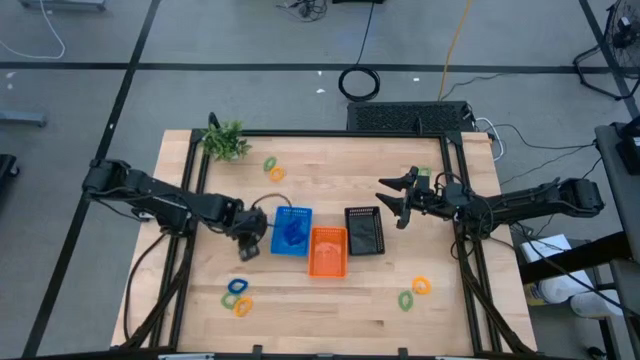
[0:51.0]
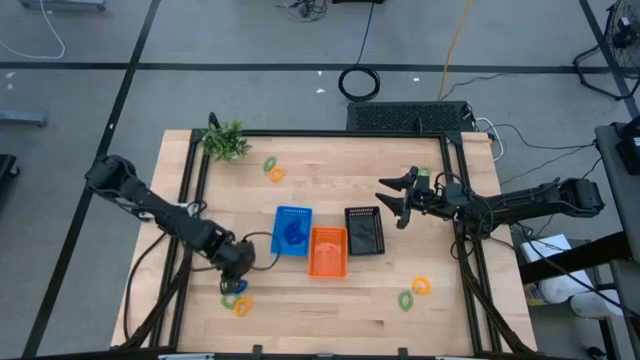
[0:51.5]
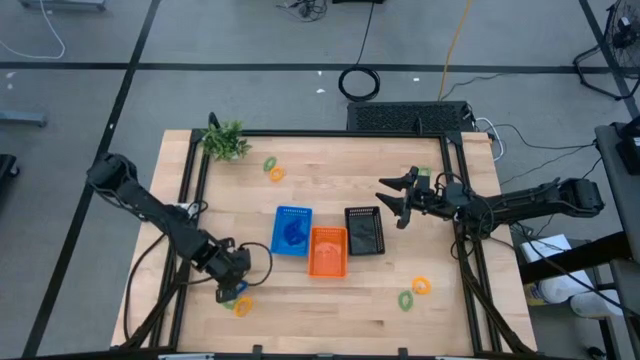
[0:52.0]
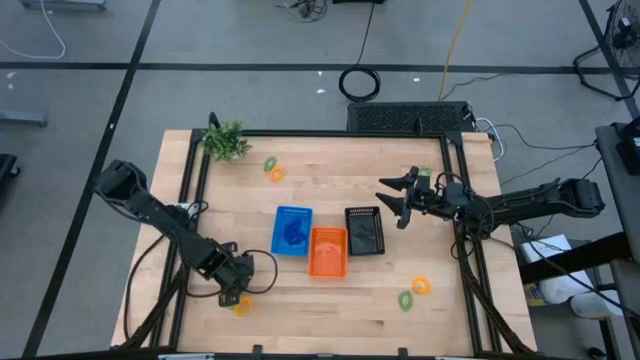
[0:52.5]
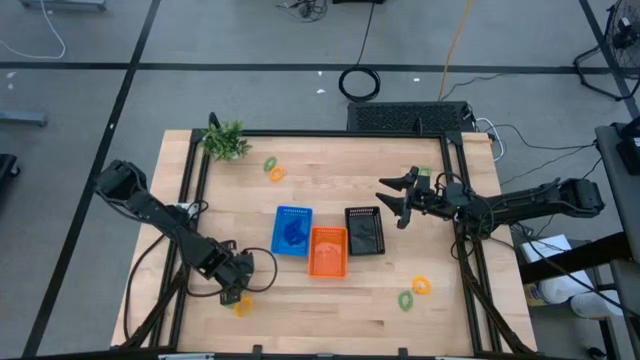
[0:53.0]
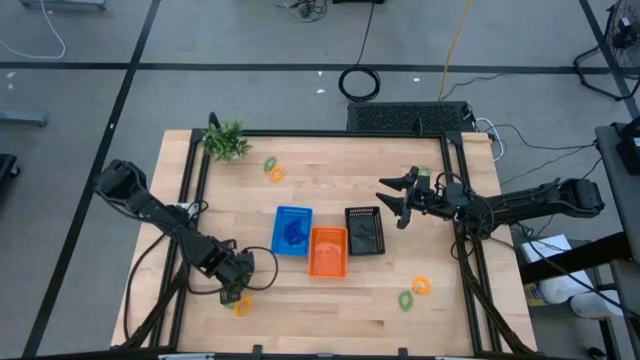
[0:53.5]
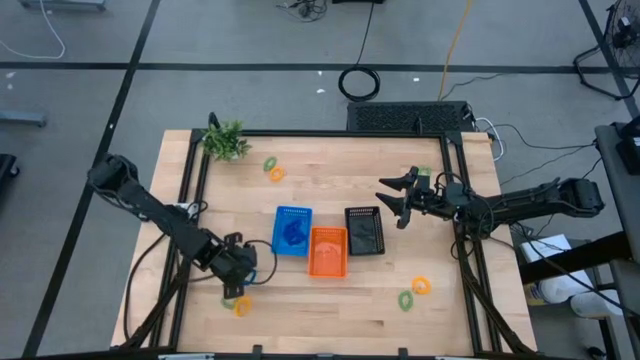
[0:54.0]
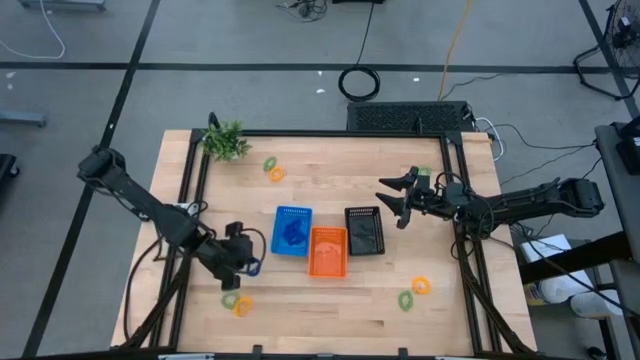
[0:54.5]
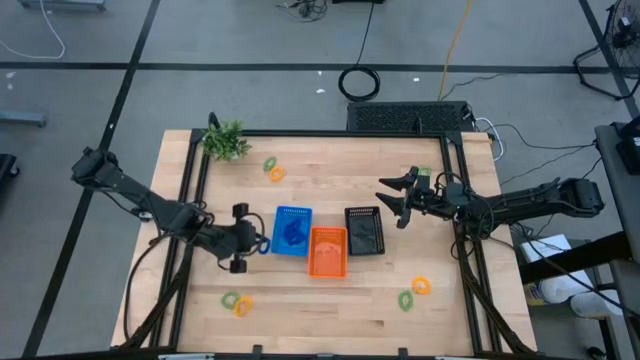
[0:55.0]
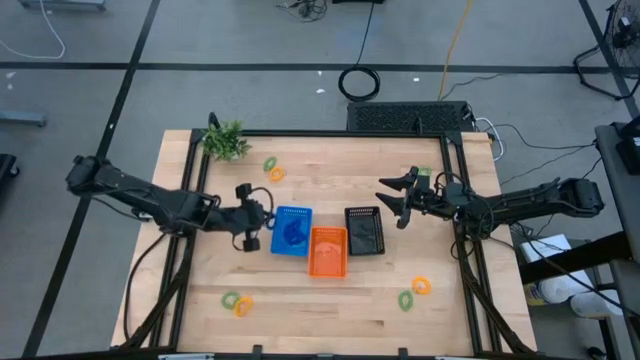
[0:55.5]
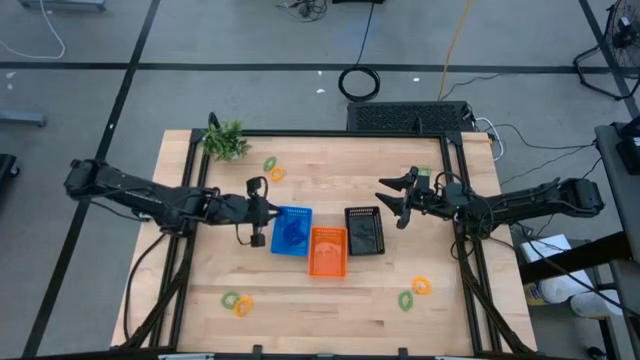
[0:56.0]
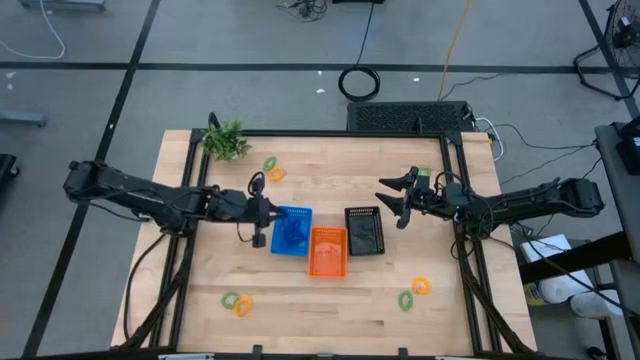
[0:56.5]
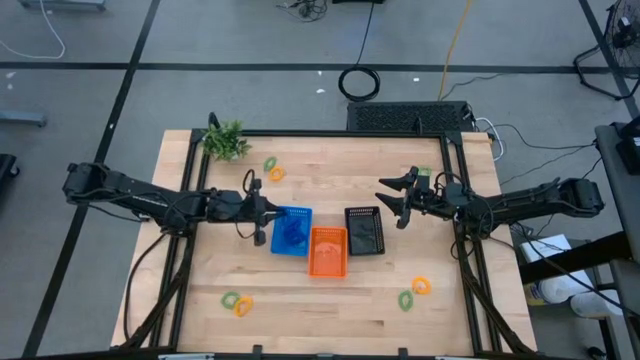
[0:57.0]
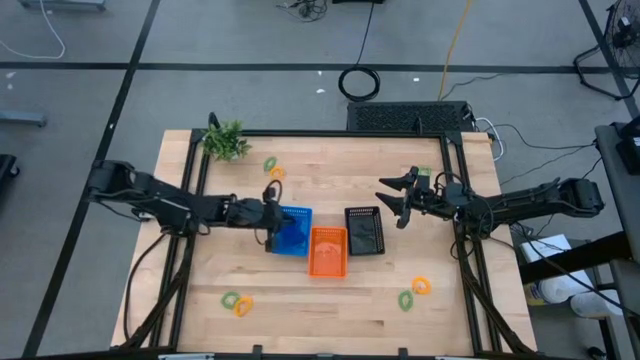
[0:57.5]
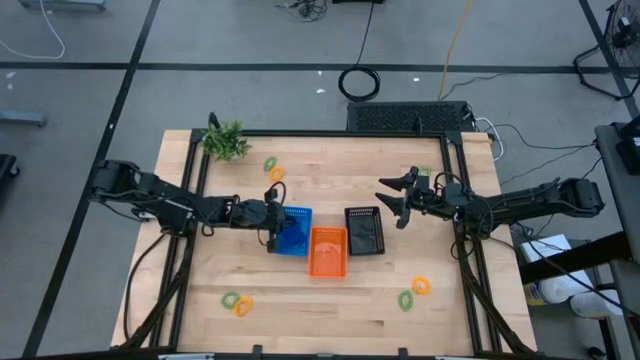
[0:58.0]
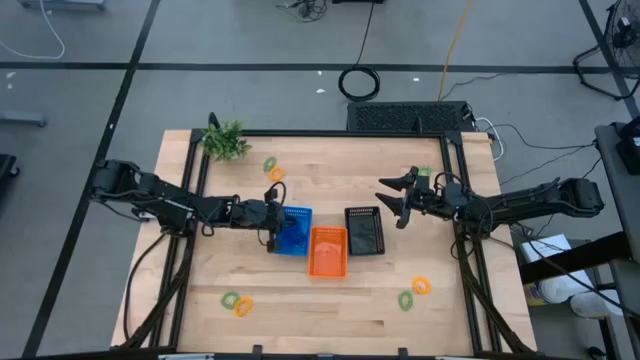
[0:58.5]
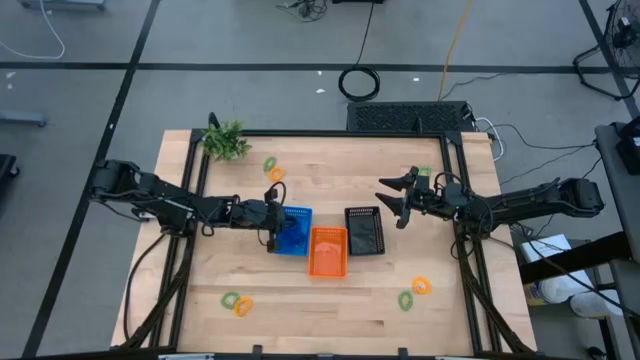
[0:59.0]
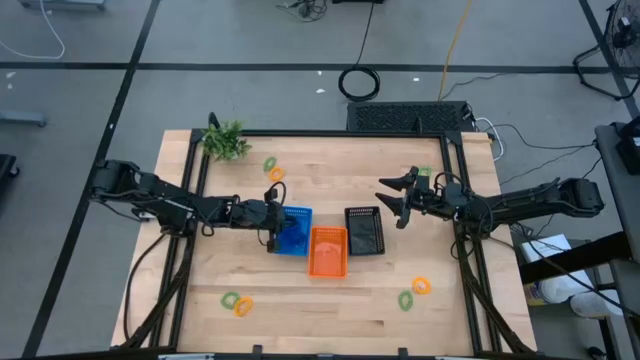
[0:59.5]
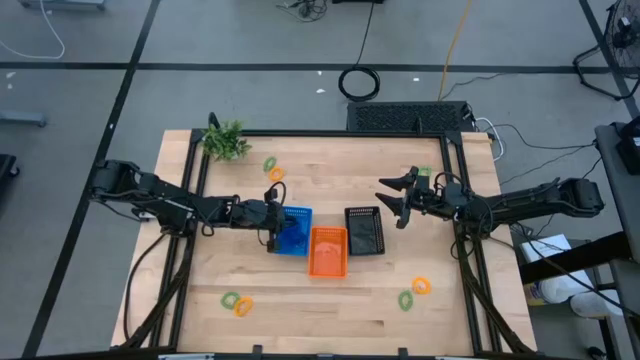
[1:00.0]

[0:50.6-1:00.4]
Task: Sort spring keychains
Put the blue spring keychain into the blue bin

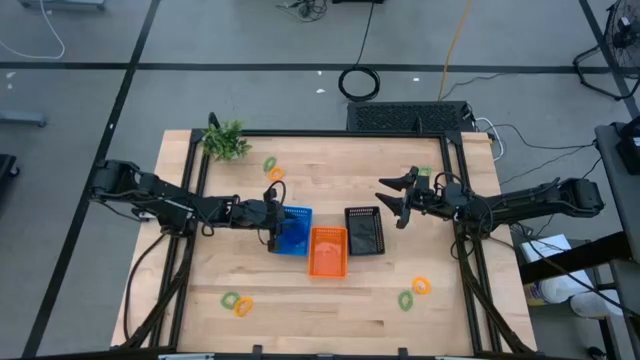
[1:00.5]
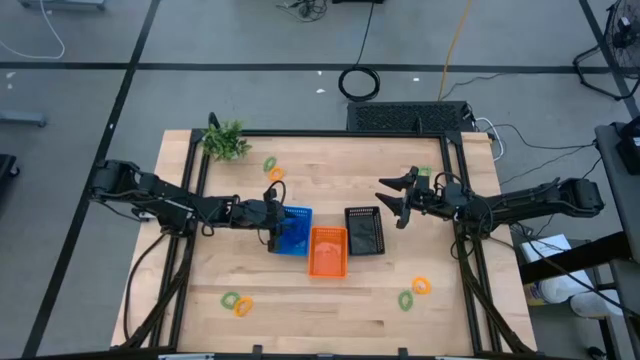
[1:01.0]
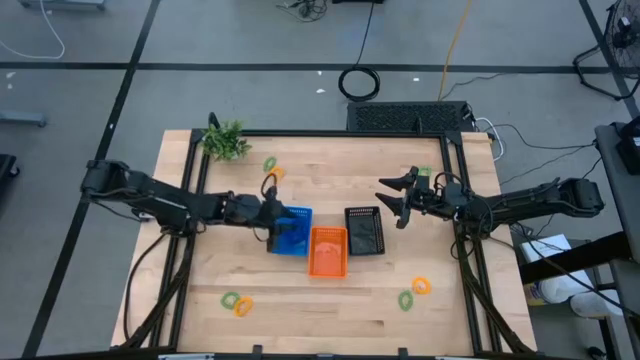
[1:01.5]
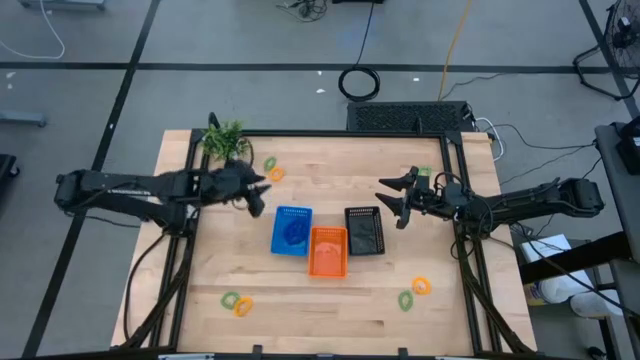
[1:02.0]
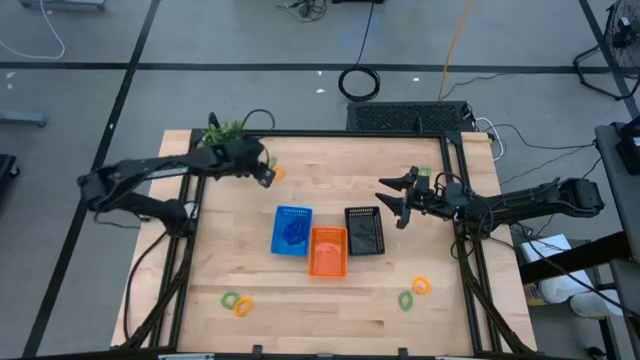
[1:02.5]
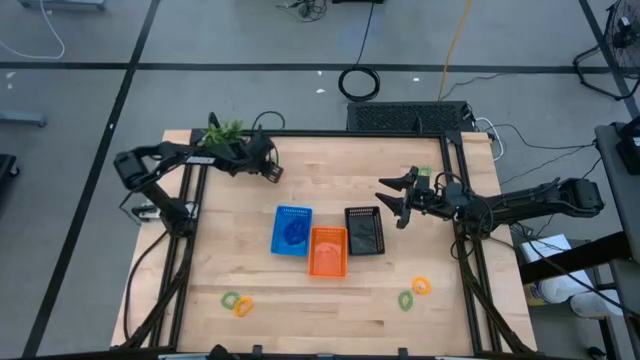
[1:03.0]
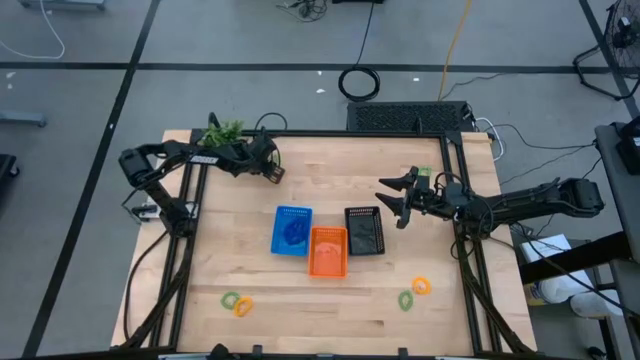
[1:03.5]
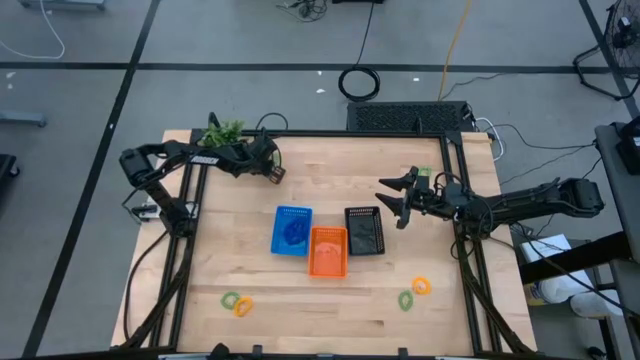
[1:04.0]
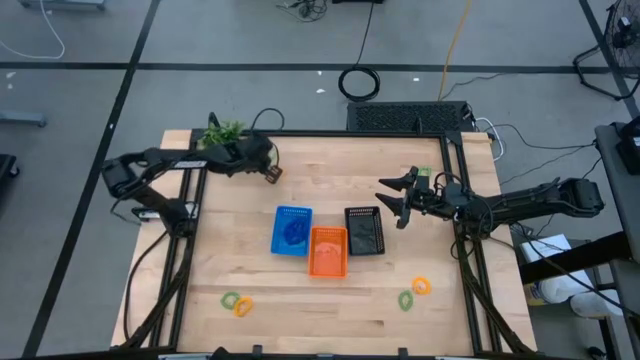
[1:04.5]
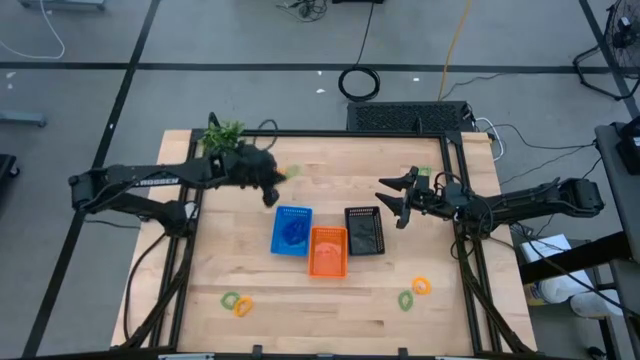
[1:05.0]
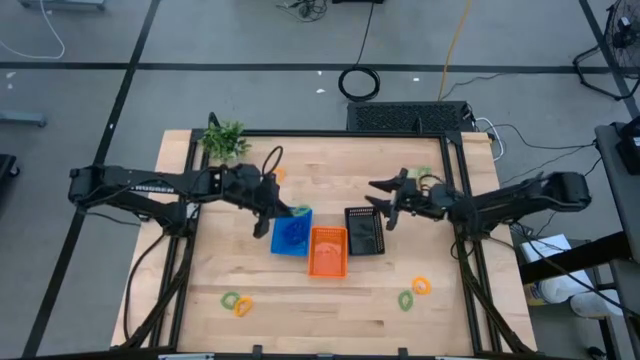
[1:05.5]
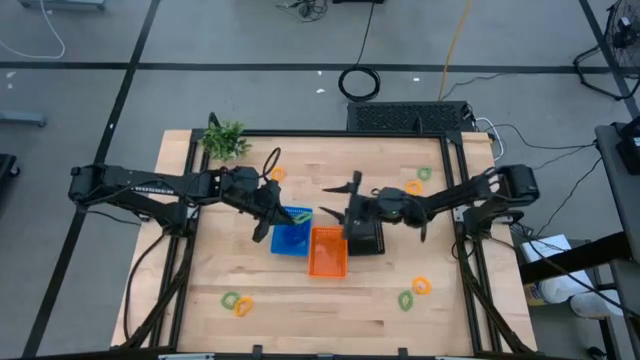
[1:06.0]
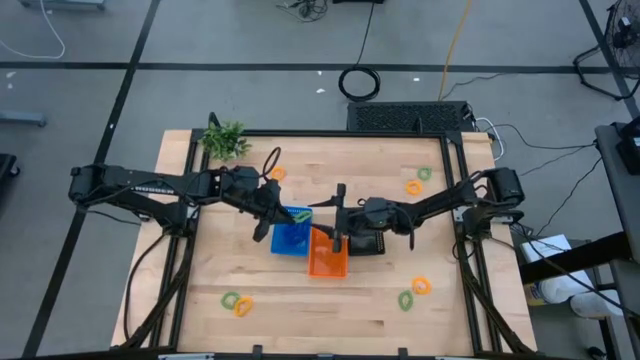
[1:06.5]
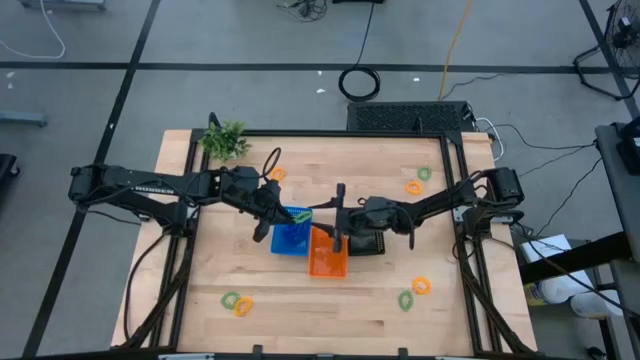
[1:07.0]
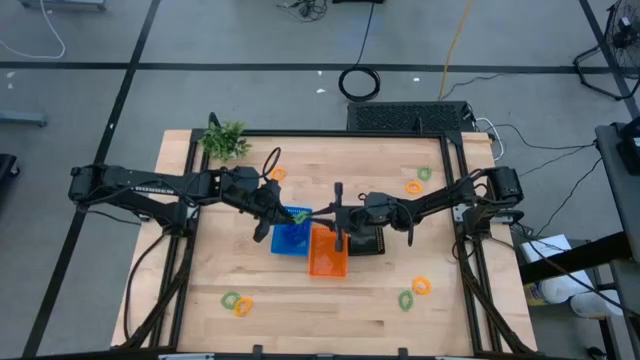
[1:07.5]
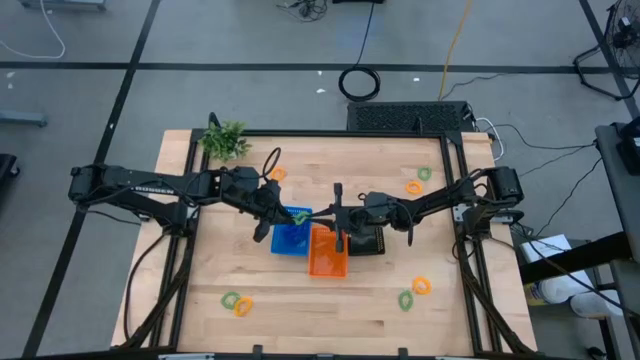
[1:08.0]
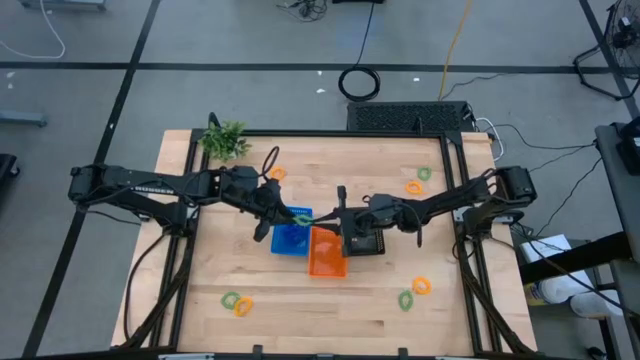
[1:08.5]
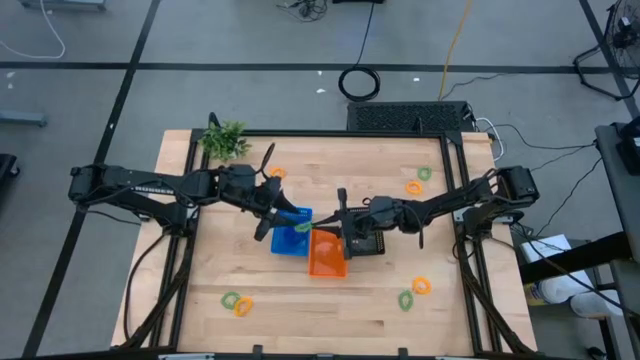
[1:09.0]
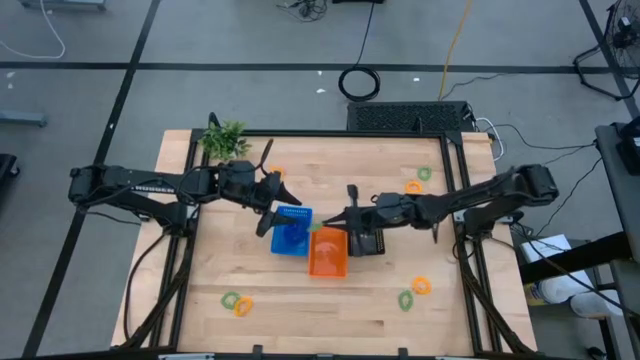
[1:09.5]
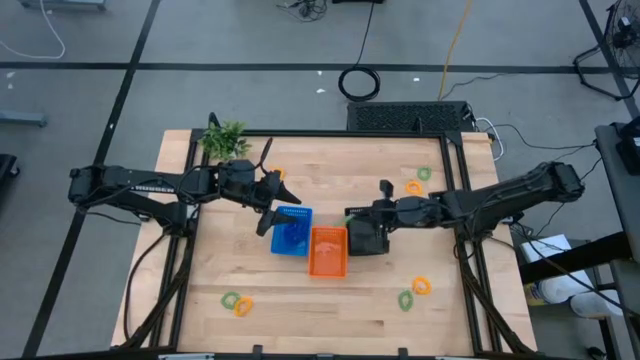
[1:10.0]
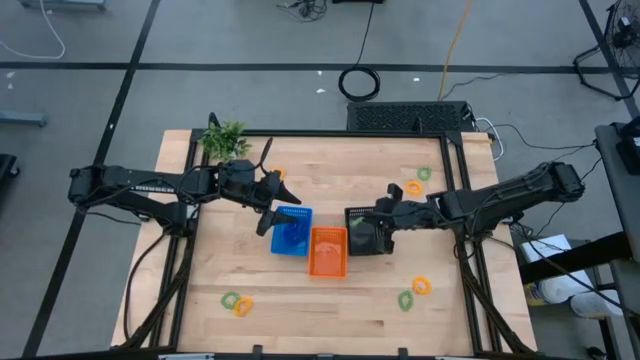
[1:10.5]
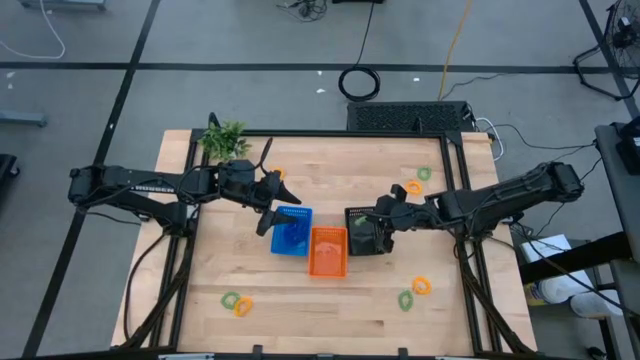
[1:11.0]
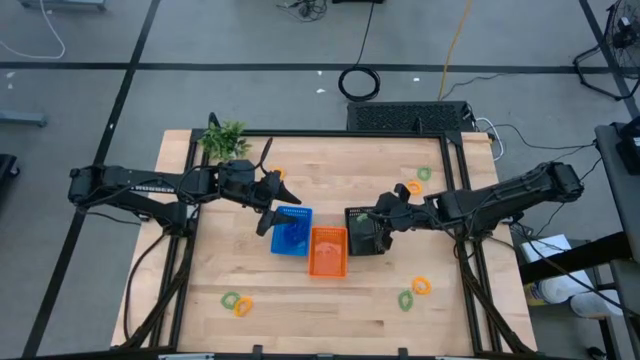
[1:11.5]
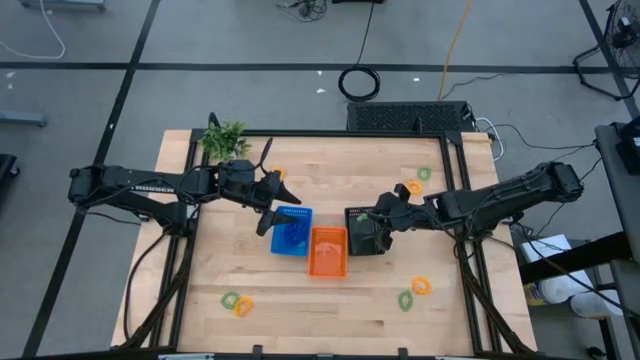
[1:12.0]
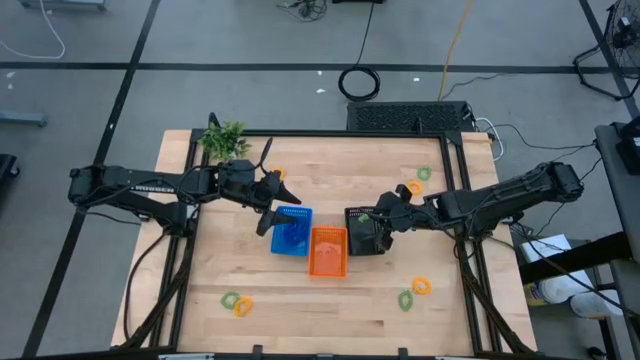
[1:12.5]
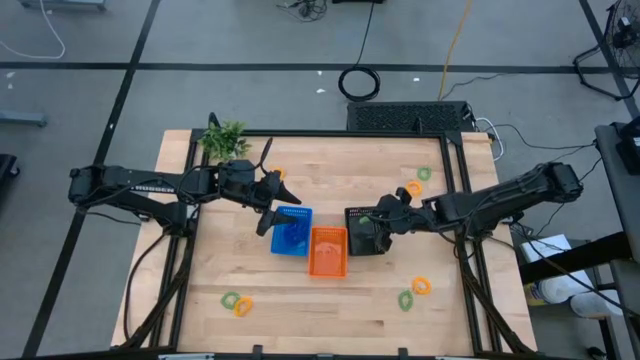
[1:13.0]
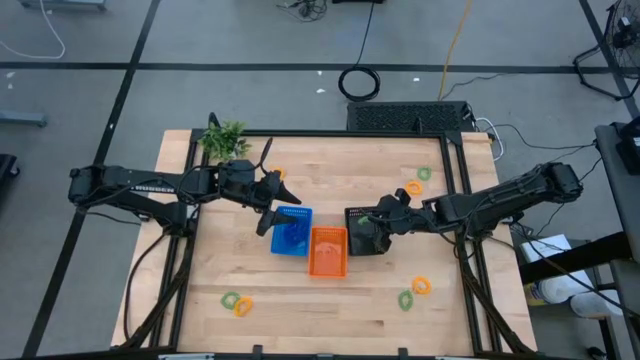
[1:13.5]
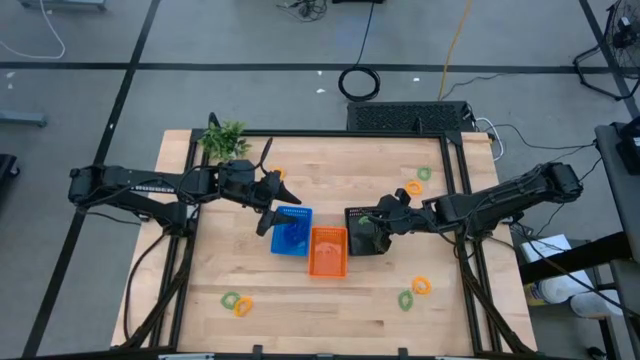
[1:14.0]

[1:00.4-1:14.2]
Put the green spring keychain into the black bin
